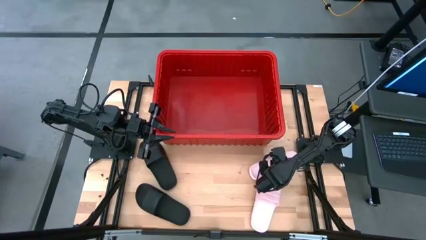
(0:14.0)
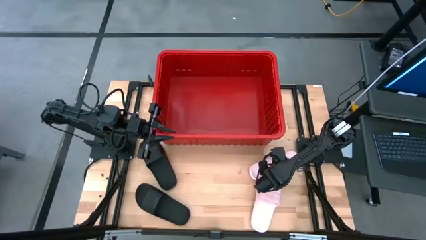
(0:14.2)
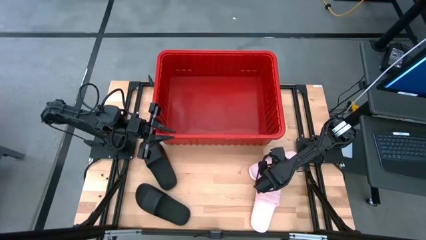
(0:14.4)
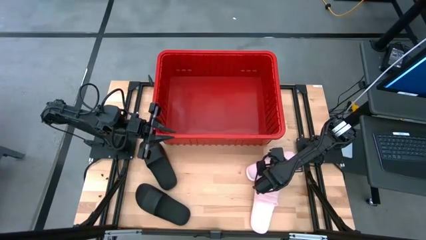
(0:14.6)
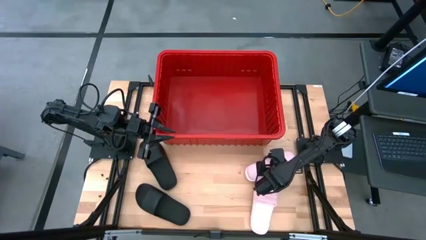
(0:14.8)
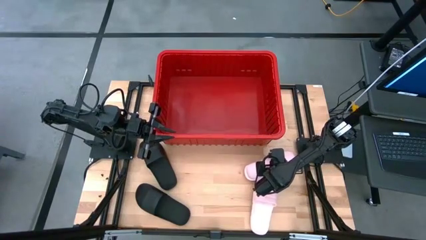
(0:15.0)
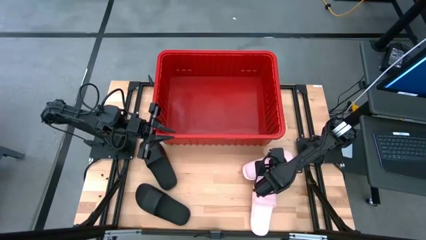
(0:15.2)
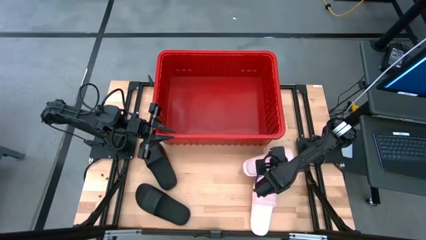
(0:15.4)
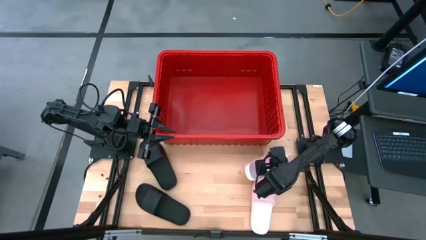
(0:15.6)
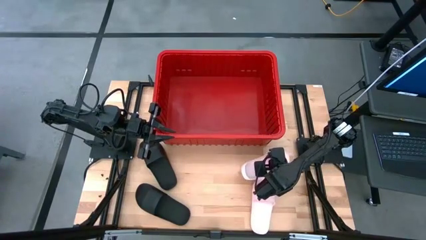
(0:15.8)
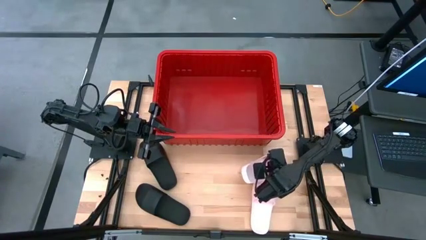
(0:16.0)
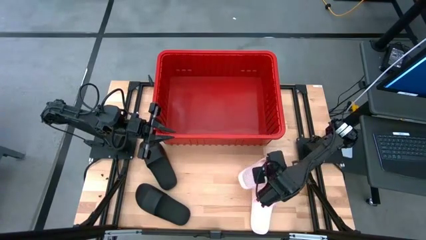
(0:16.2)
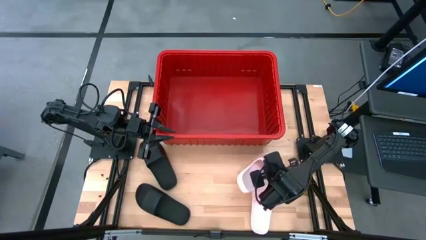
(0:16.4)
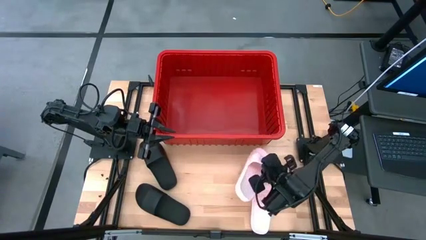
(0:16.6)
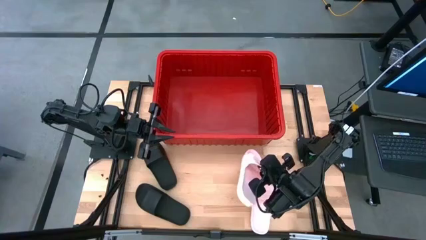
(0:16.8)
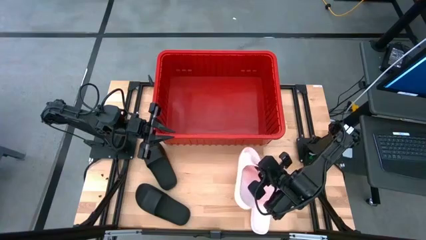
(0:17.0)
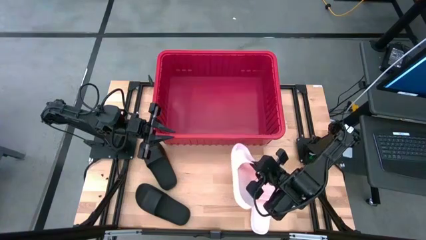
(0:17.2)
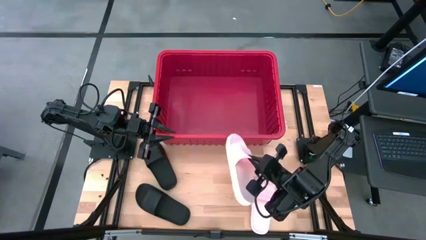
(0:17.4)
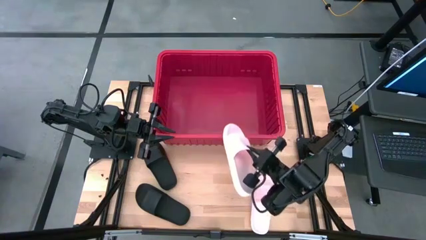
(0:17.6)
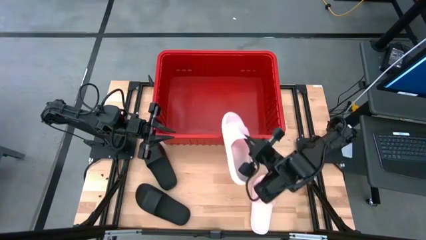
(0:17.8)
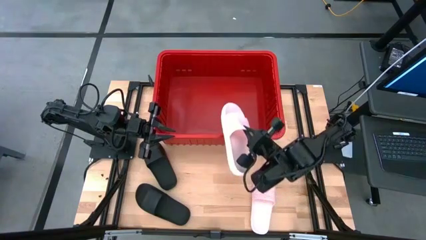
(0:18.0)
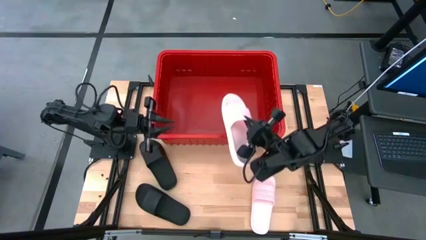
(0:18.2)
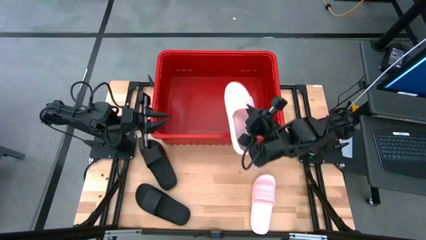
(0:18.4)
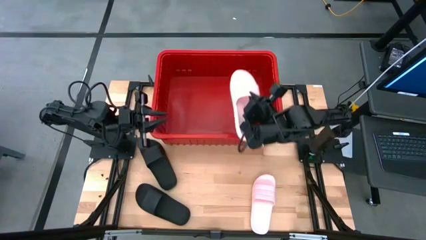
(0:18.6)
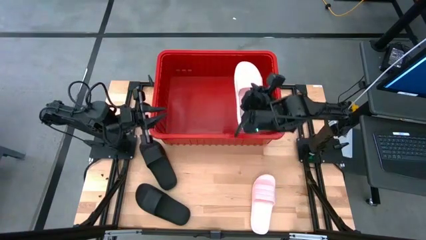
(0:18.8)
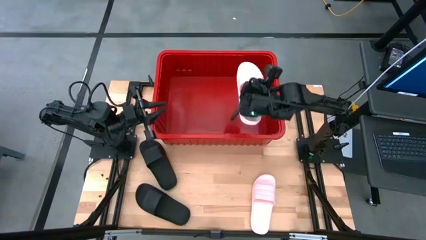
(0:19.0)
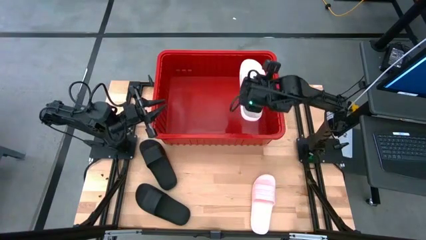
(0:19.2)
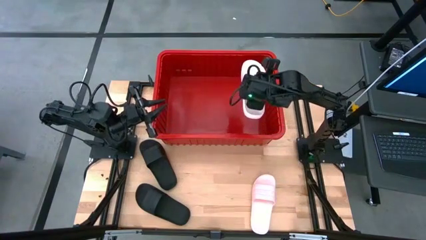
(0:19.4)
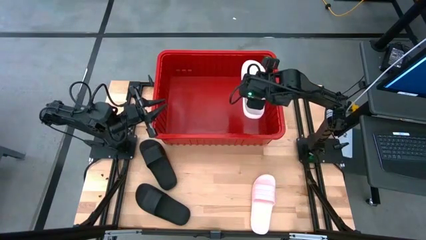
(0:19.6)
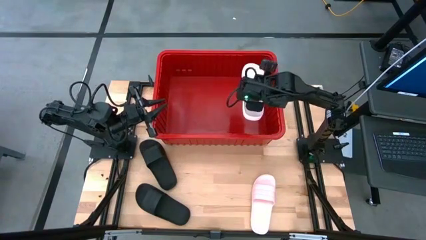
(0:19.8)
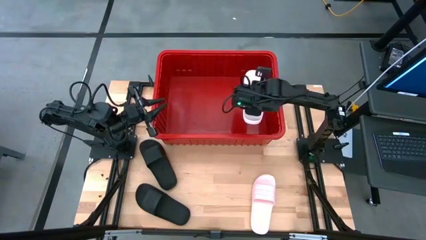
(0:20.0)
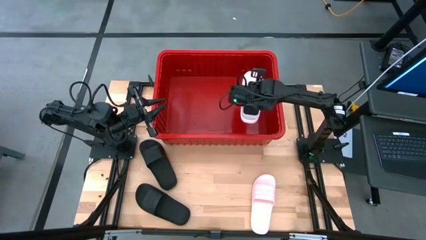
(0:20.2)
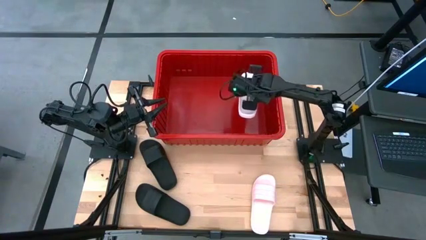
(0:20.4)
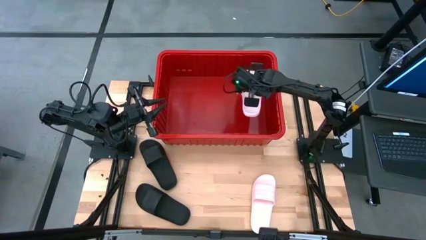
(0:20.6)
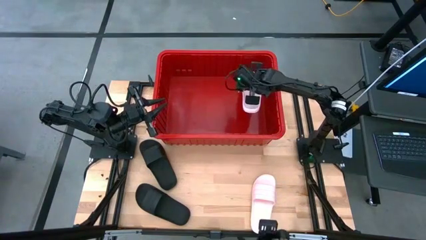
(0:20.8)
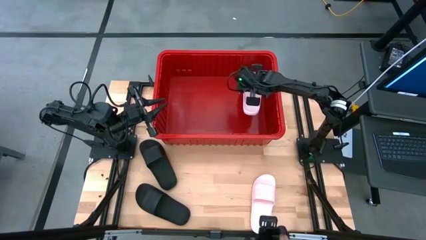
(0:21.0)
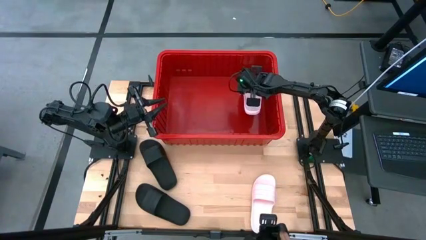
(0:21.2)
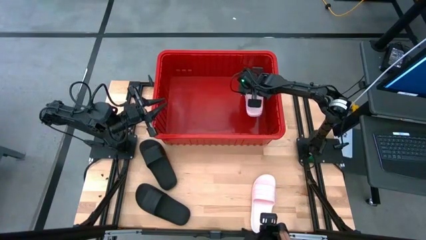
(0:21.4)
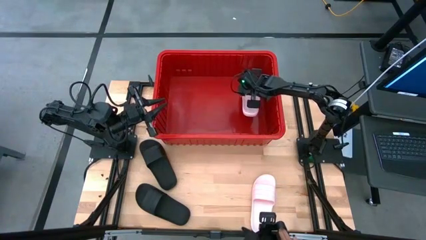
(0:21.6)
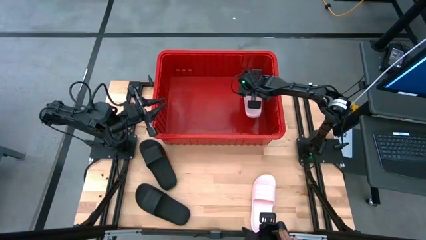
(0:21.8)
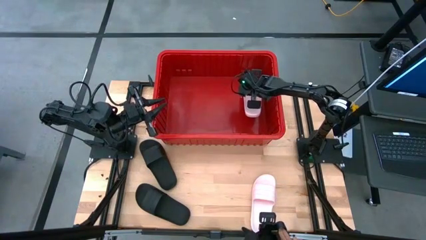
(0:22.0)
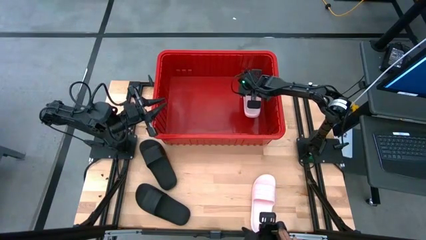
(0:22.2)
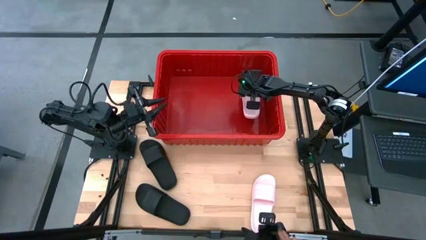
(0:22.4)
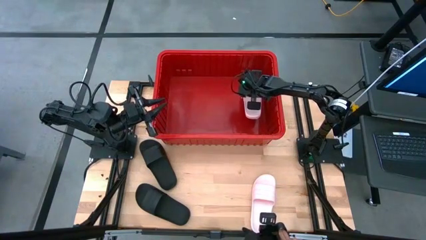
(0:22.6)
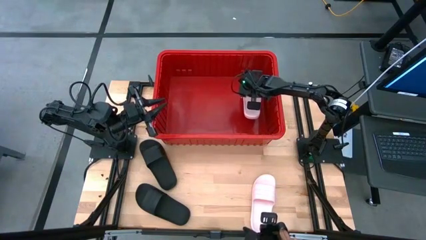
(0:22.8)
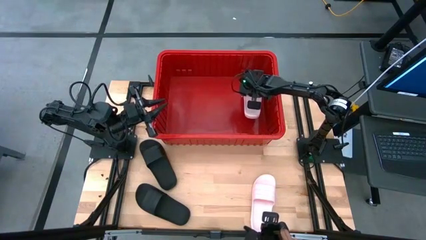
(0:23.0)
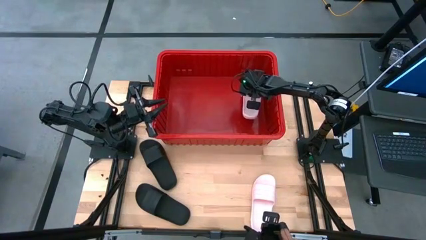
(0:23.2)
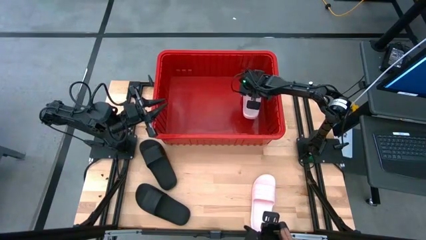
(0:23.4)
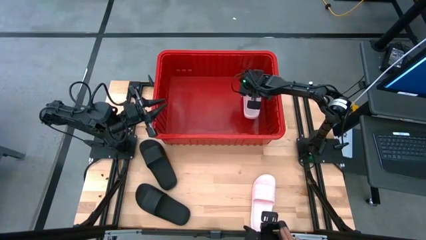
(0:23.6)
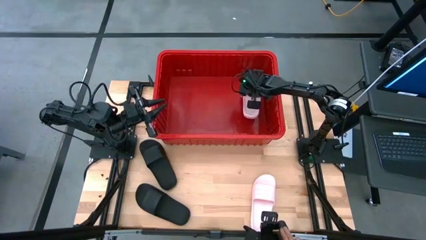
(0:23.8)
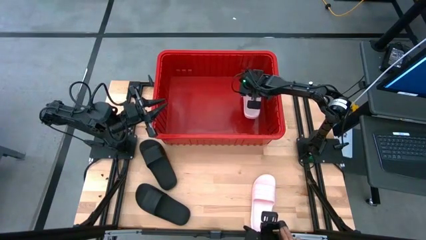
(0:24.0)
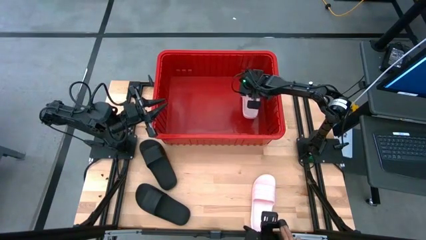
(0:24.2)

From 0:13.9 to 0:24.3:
Task: Pick and place slides into bin
Put the top pink slide into the red bin

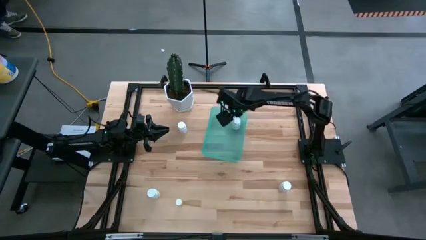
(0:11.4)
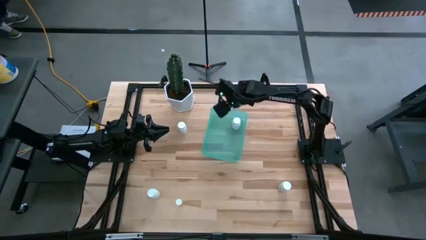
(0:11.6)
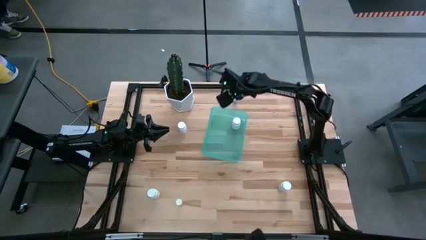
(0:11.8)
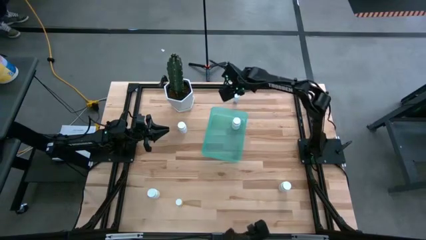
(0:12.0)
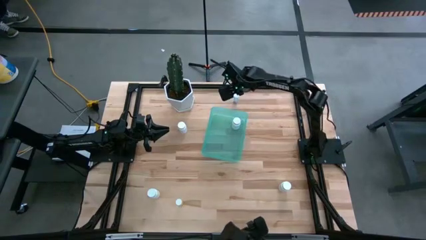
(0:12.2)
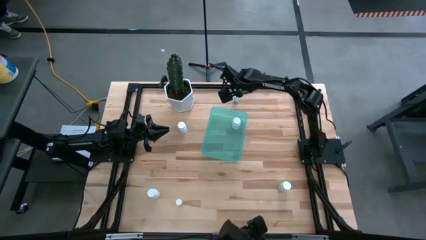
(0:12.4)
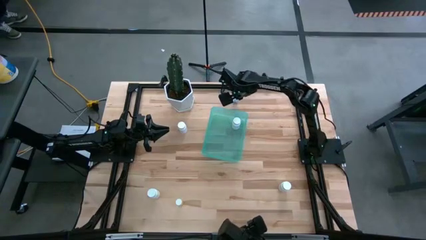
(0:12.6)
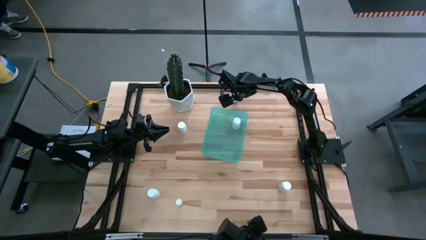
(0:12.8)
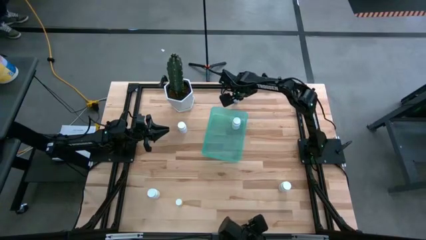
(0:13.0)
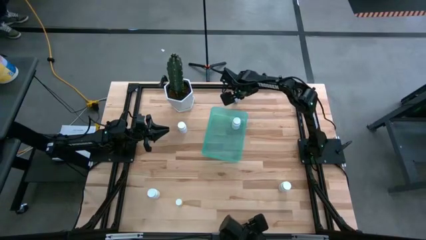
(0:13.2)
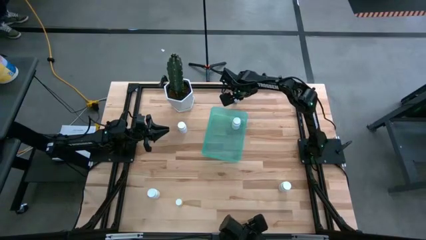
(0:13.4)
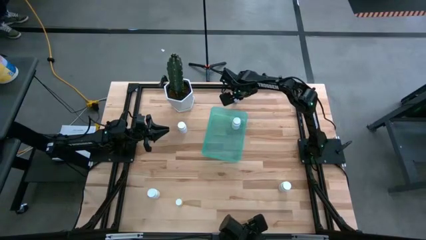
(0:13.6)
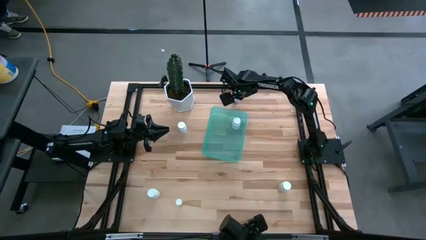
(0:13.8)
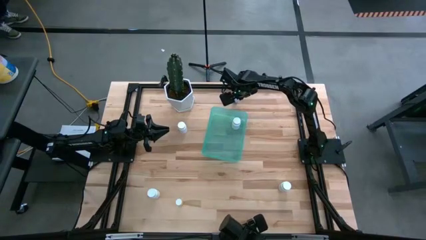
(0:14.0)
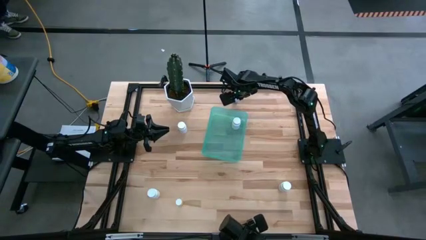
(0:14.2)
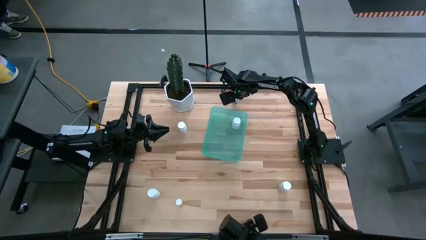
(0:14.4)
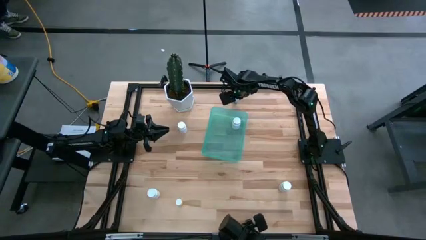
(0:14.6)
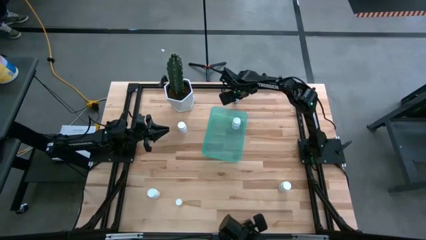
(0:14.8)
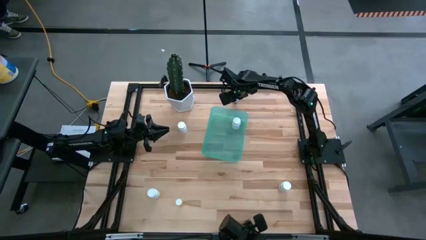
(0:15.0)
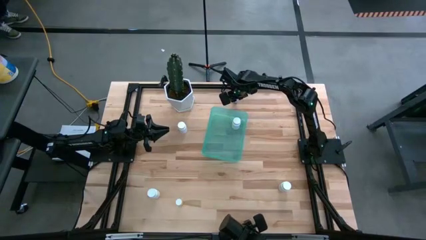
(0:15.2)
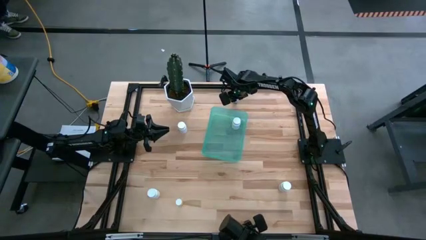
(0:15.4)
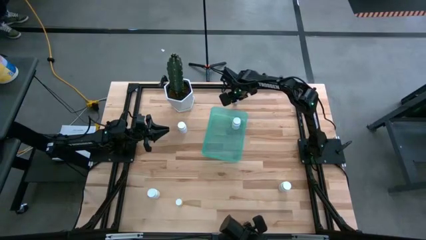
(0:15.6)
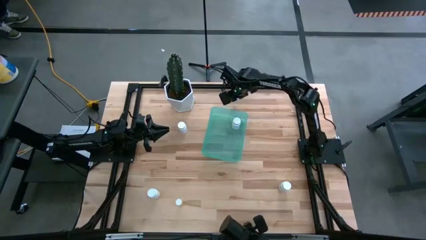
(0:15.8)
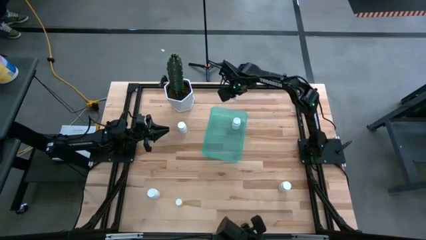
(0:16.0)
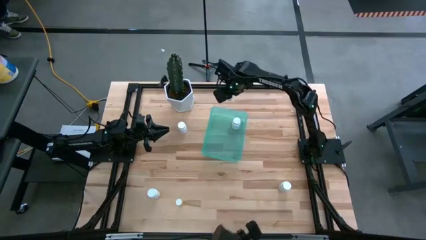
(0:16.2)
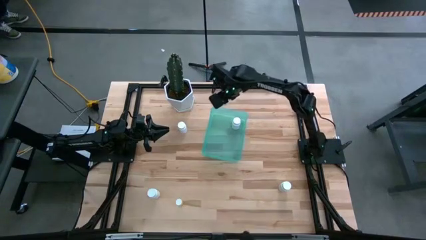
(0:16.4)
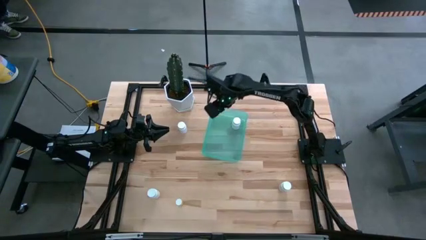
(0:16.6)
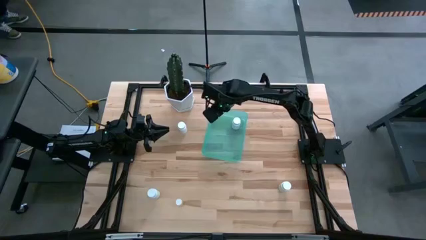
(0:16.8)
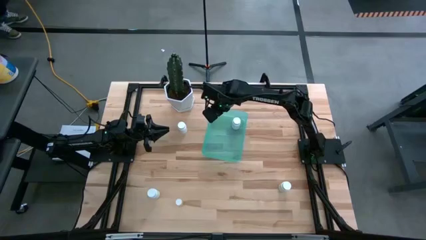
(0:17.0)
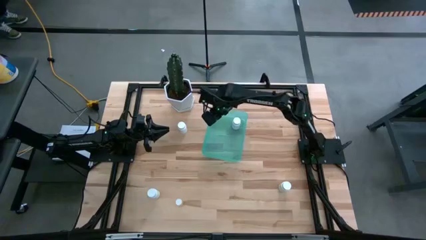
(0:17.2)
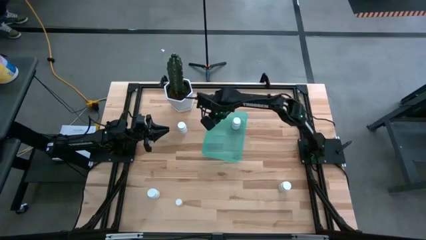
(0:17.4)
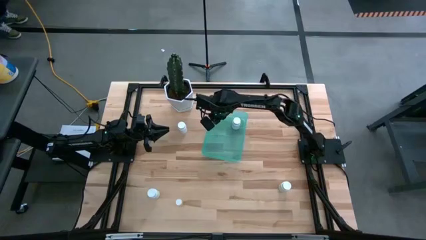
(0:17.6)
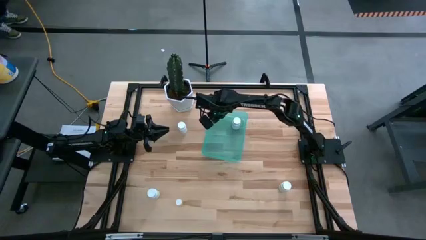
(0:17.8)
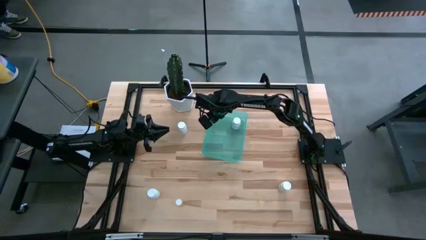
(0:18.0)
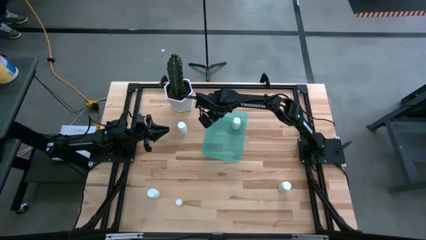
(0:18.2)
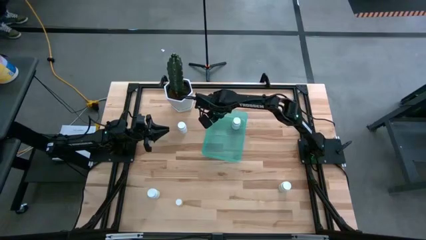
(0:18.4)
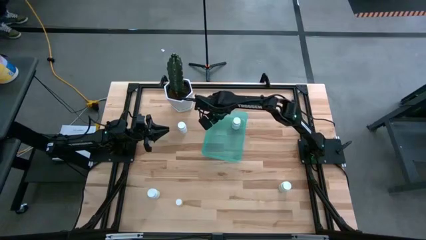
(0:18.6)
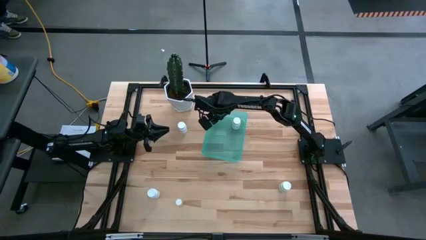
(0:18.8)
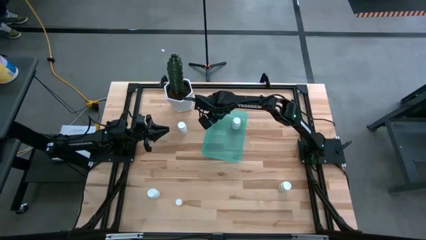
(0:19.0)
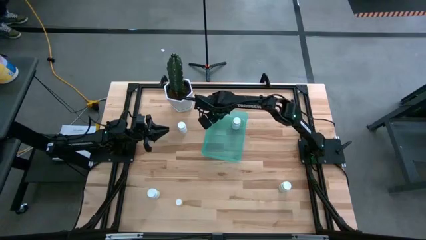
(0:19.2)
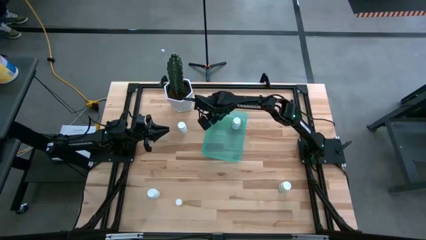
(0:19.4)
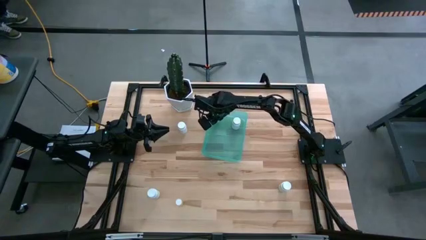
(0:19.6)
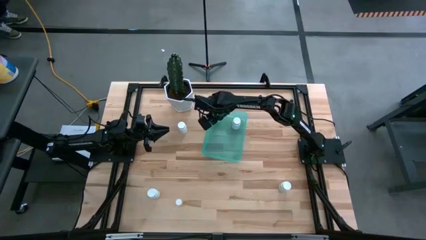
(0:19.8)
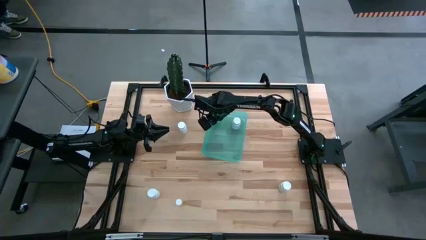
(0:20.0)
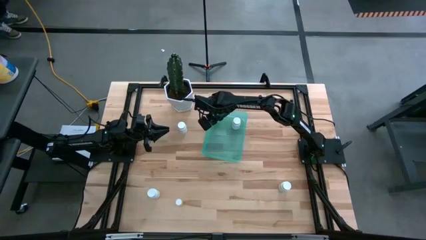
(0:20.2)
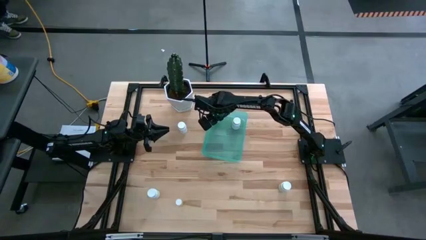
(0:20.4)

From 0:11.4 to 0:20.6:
Task: Pick and place pill bottles into a basket
Put the blue pill bottle into the blue bin
